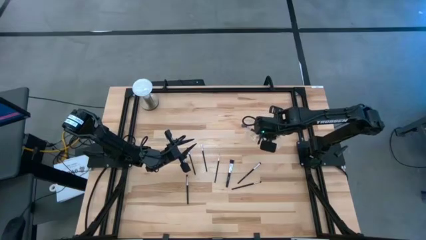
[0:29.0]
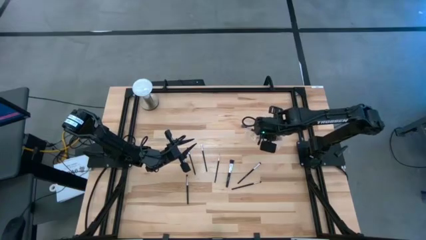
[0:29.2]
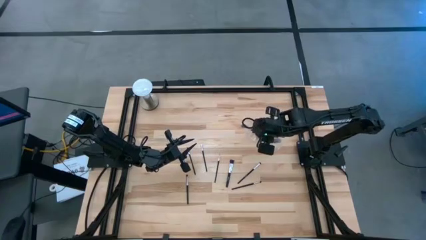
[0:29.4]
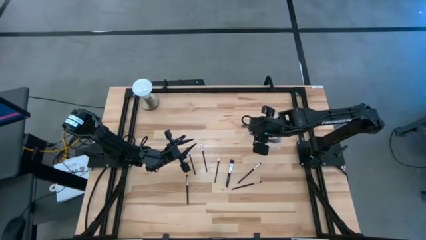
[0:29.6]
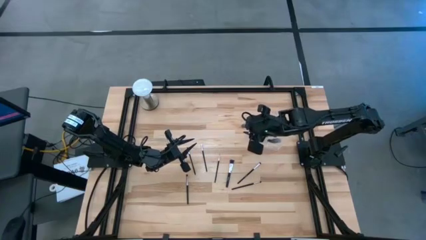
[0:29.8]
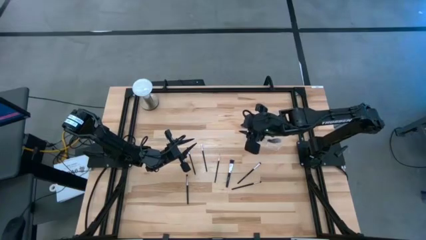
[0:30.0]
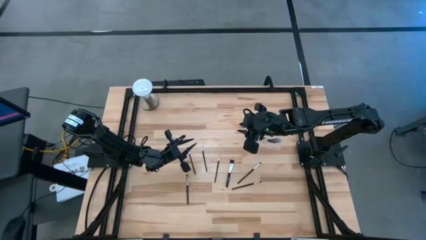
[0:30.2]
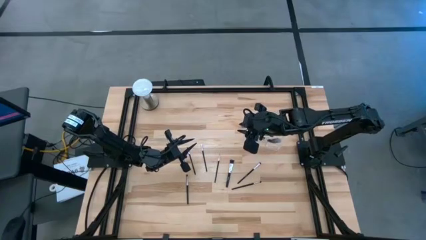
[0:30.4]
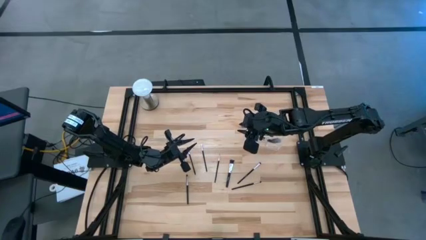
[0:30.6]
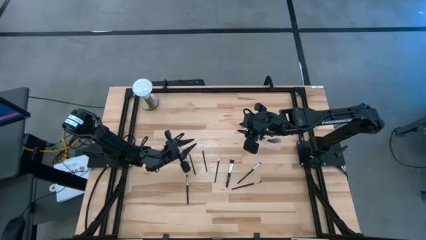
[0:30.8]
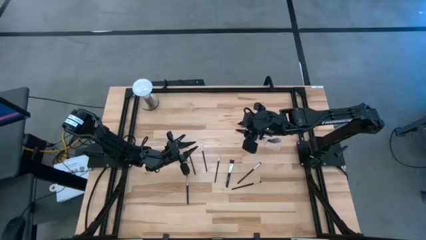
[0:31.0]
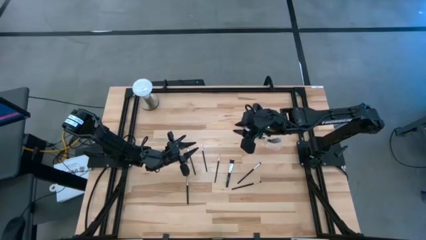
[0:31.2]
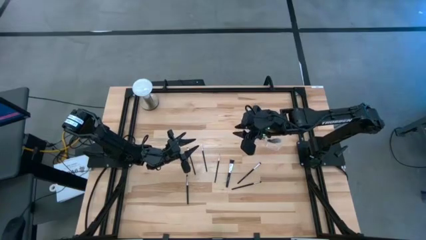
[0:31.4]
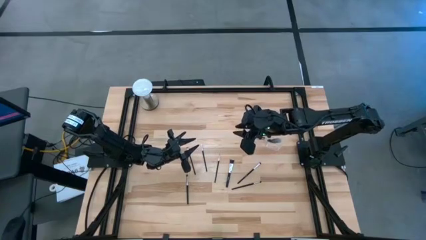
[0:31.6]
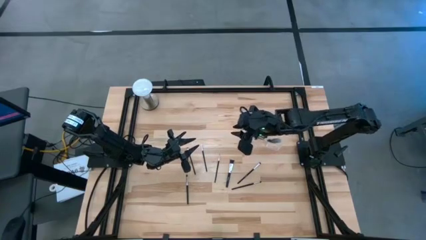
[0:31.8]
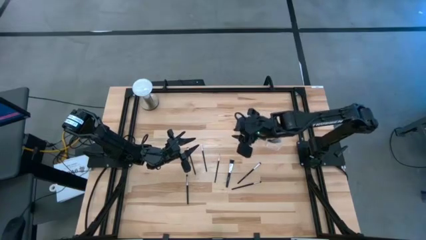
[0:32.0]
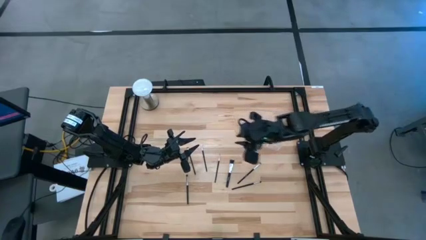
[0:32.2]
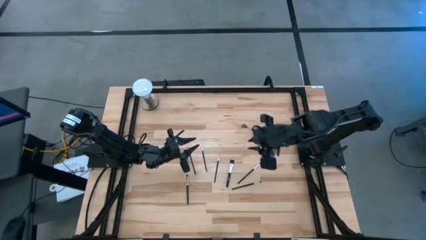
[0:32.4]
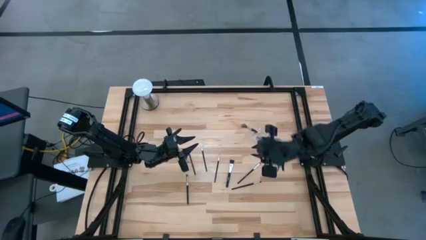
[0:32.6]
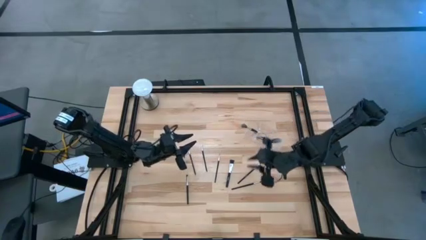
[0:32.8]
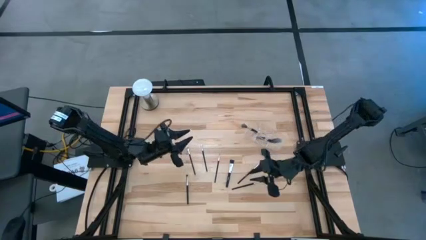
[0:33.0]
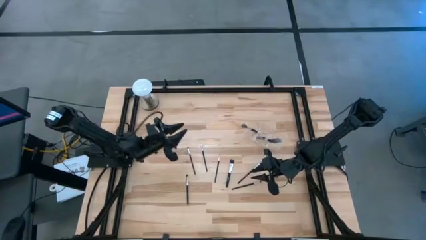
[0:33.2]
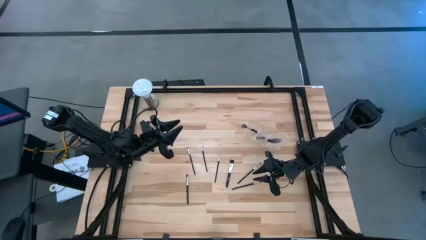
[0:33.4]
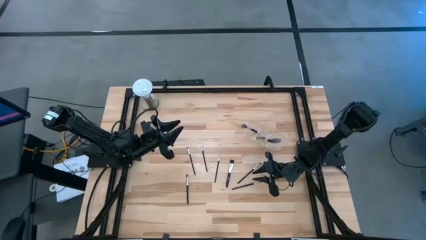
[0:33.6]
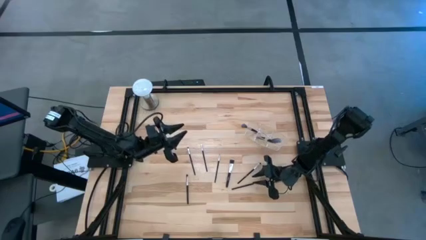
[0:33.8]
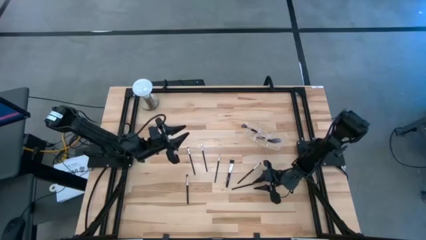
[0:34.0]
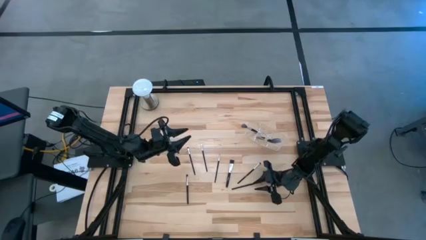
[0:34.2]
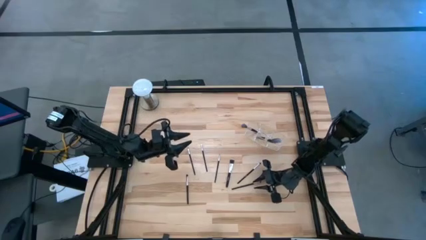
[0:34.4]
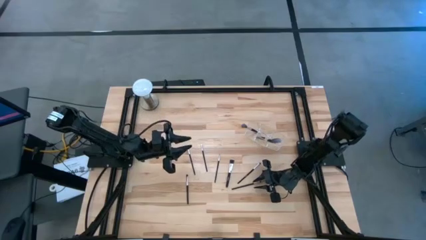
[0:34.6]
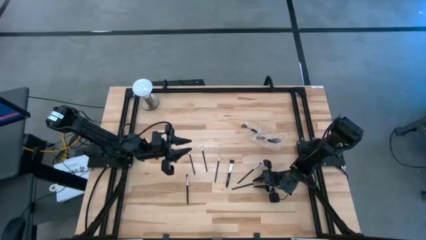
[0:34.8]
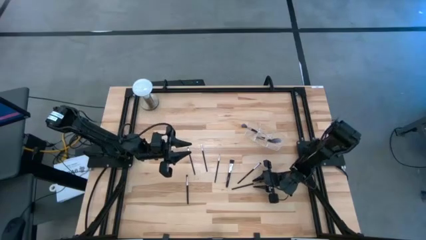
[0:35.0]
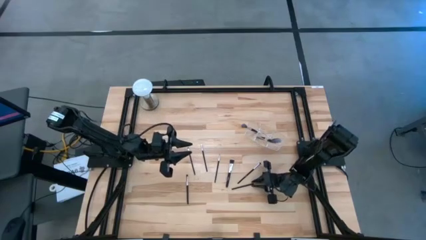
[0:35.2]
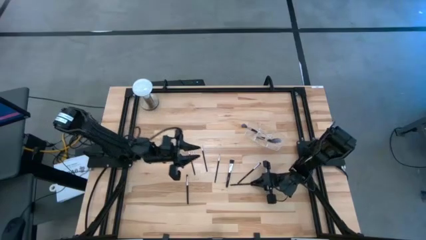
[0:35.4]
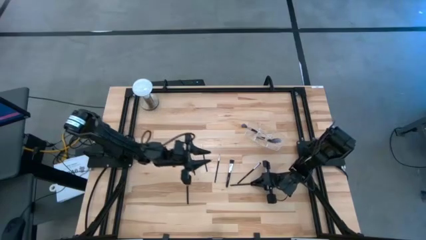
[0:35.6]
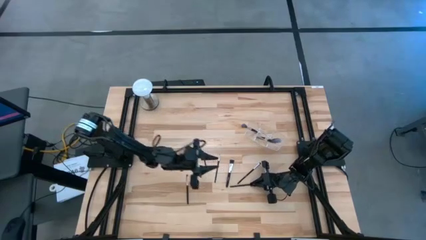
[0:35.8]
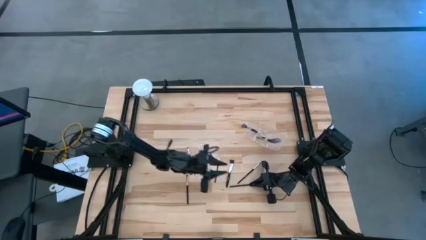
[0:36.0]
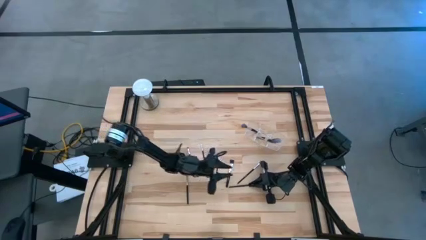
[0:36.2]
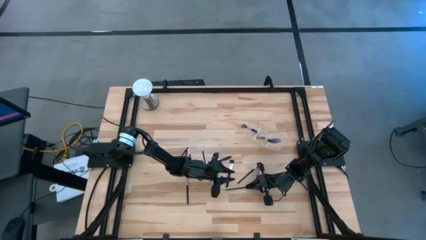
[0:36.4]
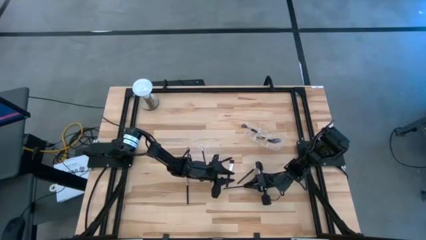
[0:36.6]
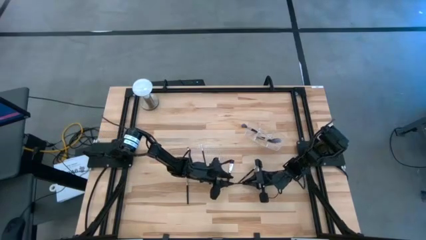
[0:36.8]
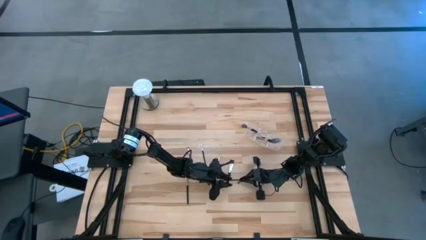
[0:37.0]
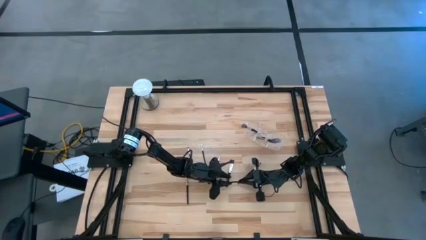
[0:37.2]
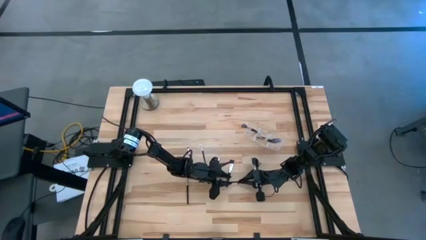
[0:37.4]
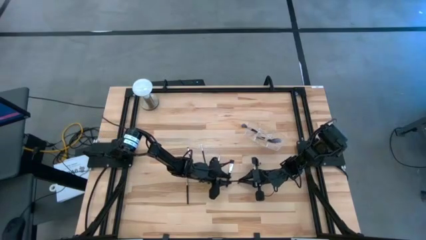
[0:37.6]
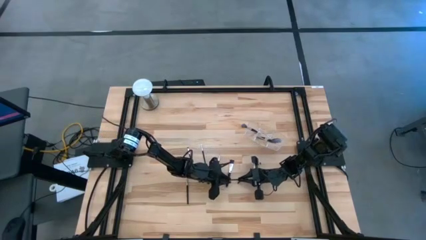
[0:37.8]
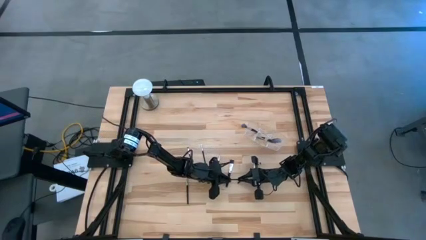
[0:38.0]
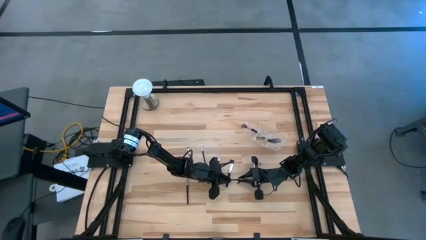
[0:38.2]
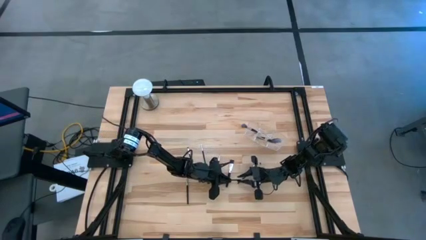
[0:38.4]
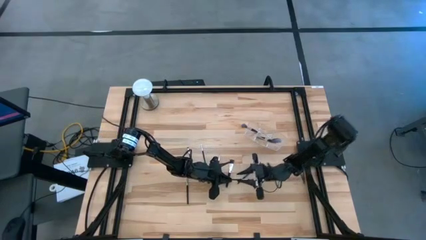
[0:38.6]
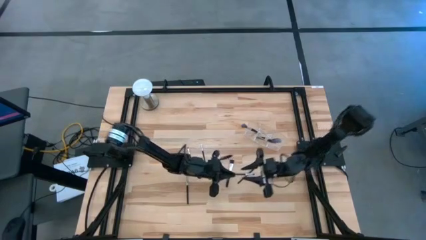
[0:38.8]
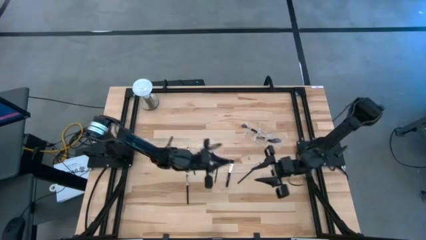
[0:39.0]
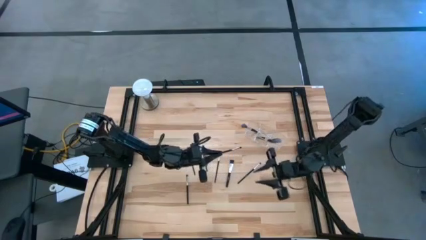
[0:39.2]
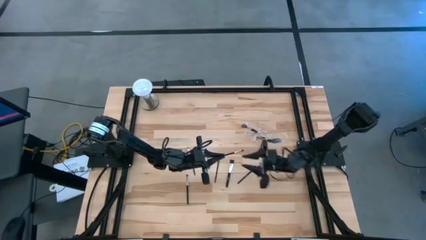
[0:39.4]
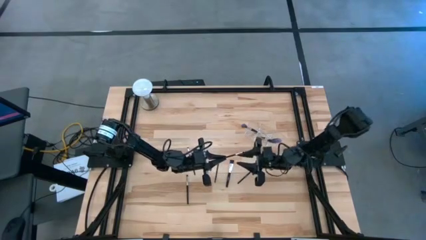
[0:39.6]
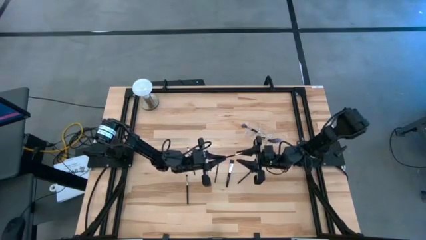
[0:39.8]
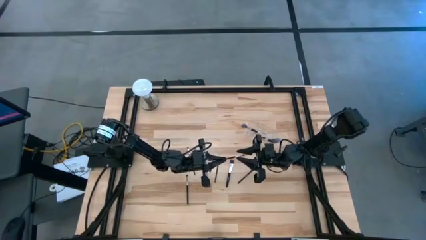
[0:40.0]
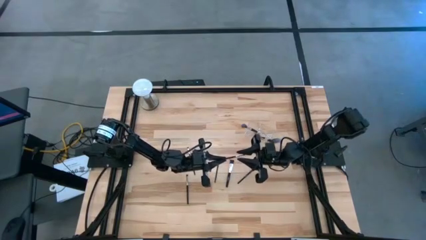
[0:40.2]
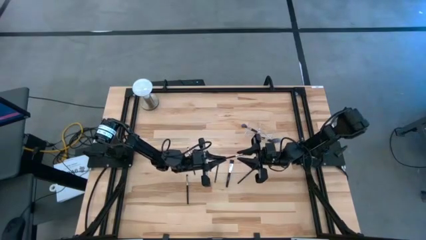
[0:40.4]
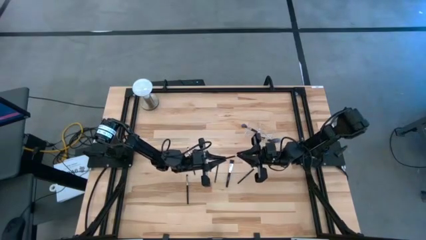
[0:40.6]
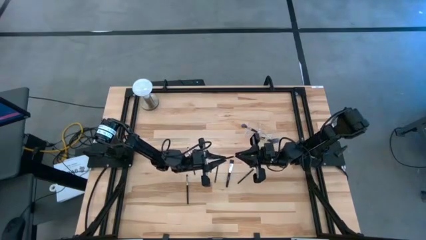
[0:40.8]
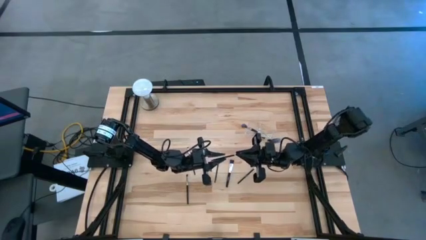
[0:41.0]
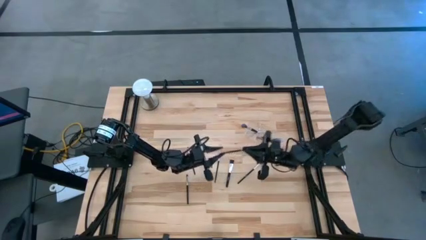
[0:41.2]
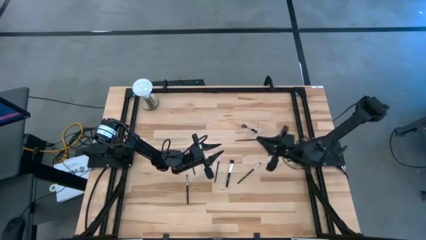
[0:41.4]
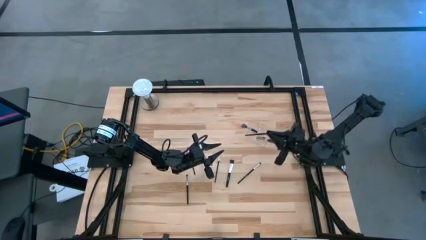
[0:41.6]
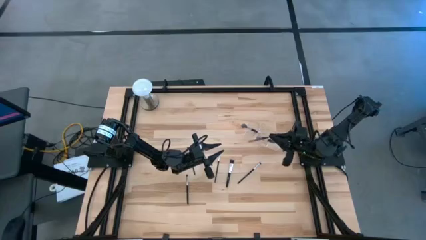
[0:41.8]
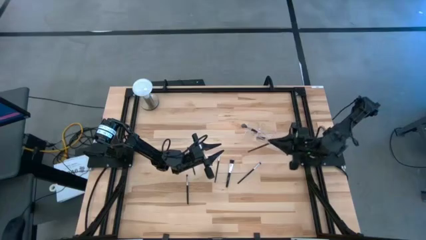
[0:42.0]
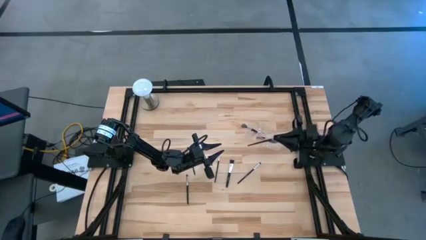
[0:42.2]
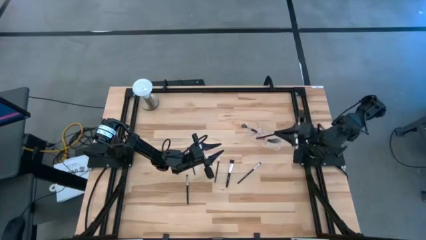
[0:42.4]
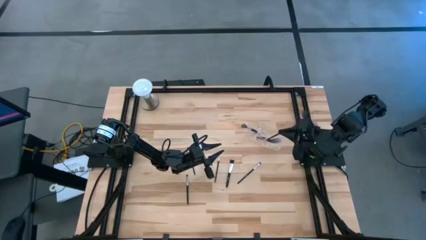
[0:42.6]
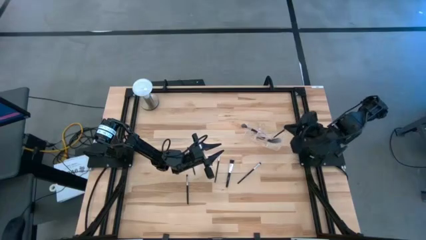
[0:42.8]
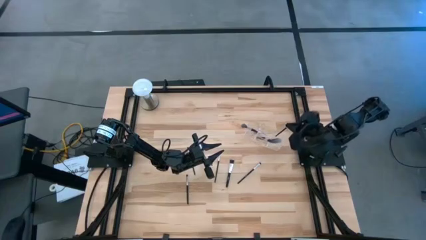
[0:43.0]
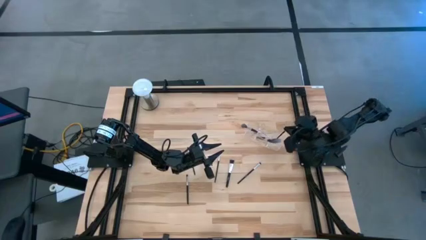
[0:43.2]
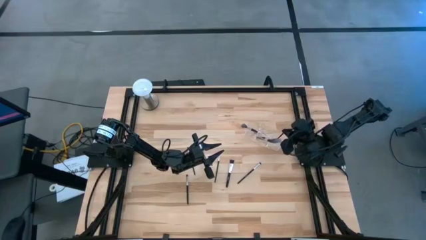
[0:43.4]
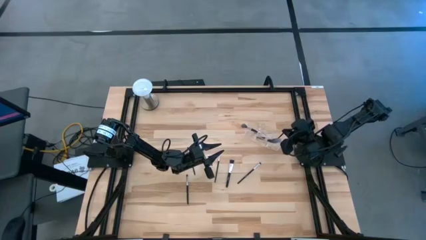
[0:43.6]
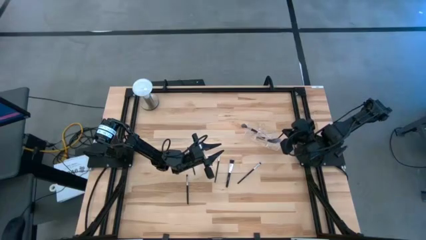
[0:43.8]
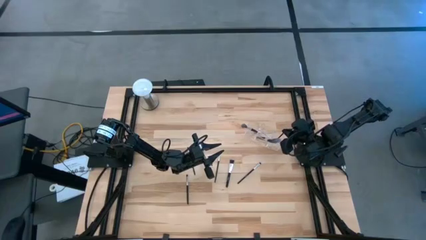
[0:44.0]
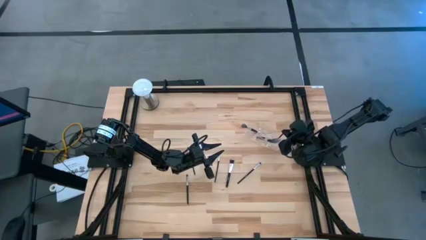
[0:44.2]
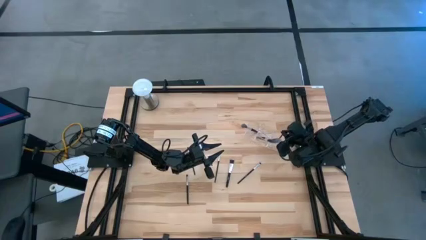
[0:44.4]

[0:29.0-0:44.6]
Task: Pick & Place Makeup Supplies
Put the black makeup brush into the transparent organizer
